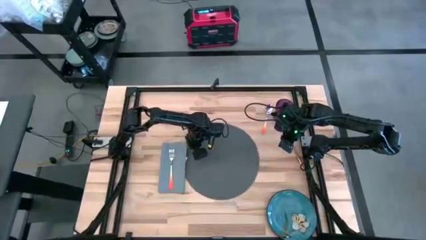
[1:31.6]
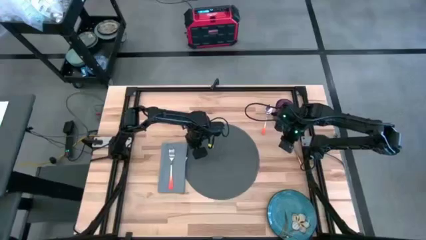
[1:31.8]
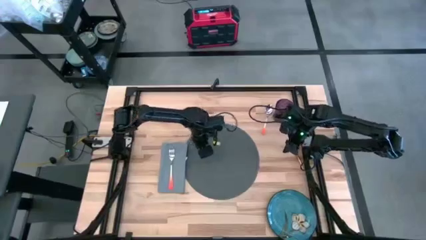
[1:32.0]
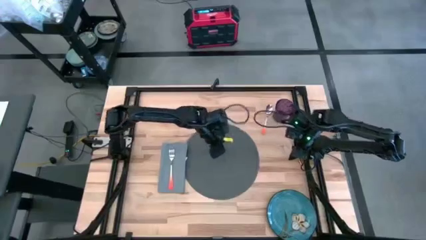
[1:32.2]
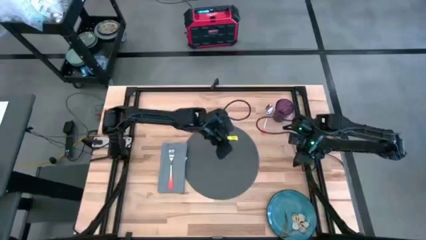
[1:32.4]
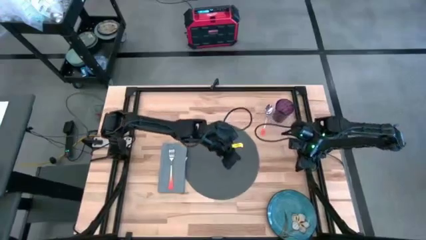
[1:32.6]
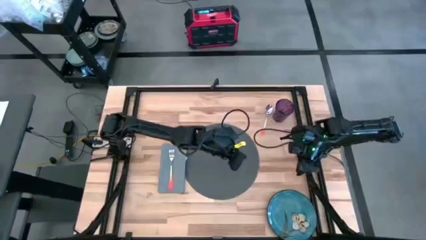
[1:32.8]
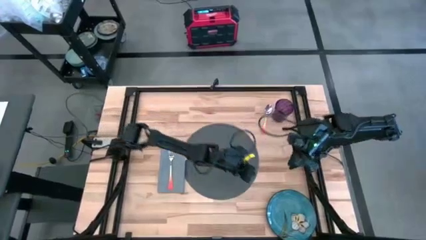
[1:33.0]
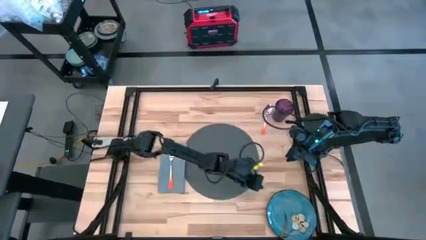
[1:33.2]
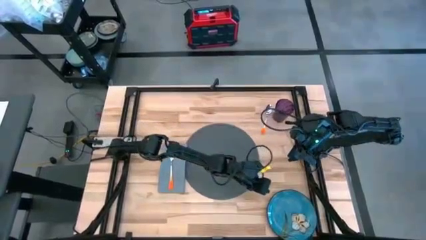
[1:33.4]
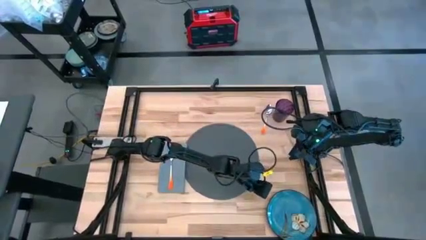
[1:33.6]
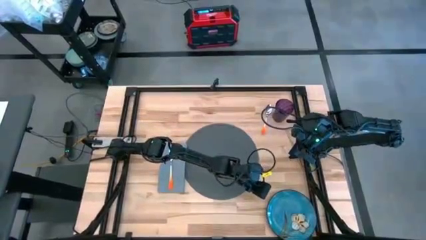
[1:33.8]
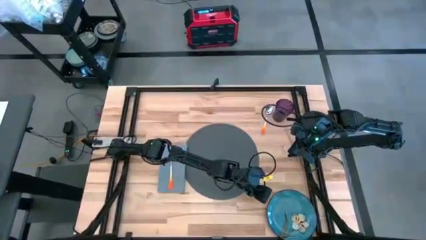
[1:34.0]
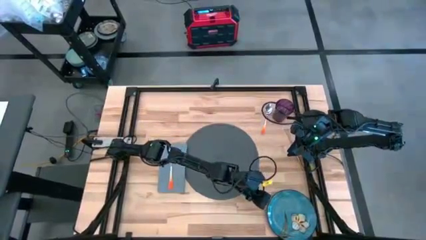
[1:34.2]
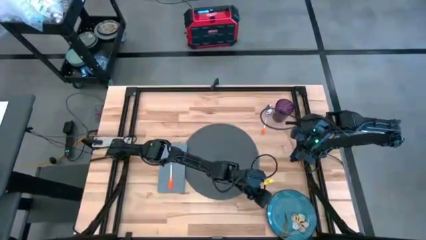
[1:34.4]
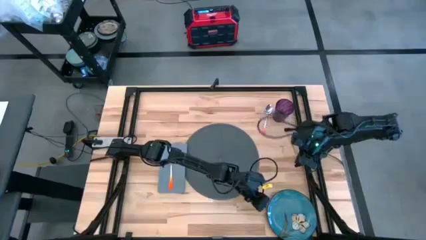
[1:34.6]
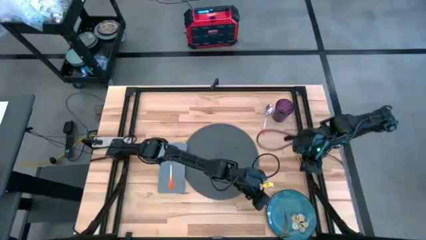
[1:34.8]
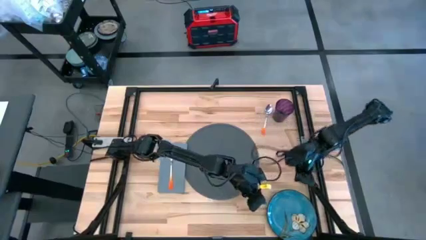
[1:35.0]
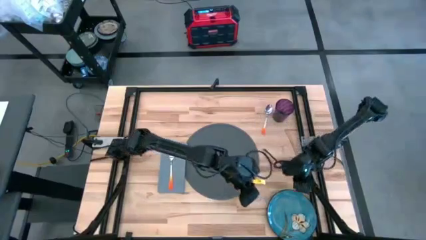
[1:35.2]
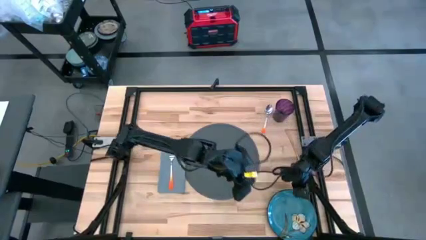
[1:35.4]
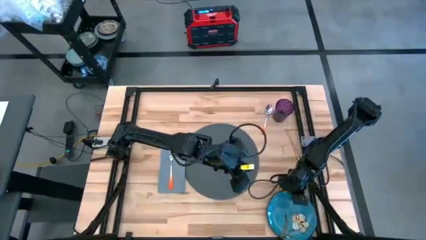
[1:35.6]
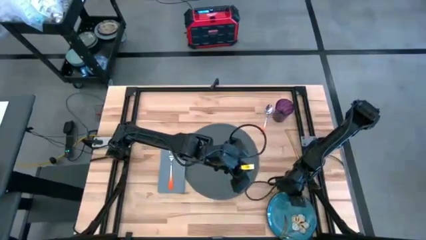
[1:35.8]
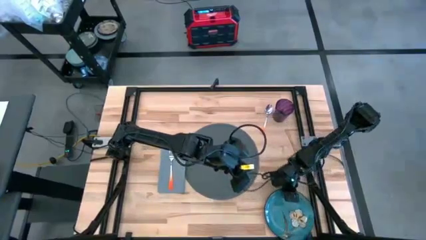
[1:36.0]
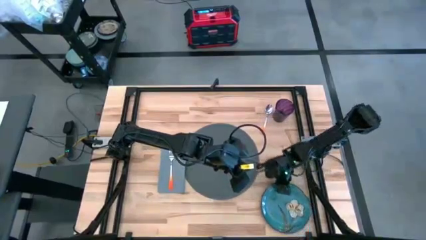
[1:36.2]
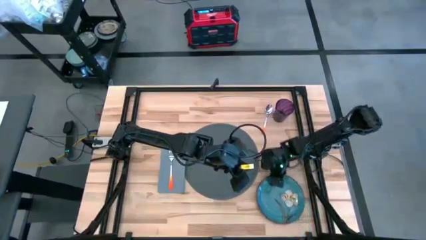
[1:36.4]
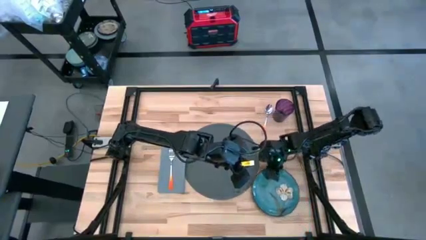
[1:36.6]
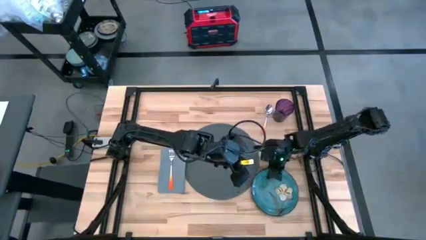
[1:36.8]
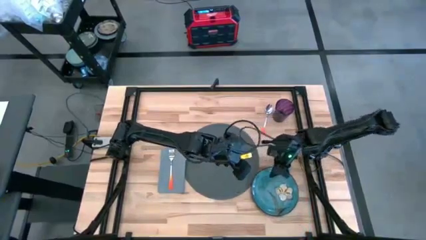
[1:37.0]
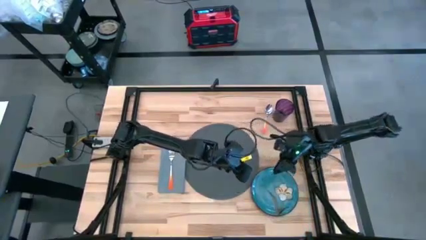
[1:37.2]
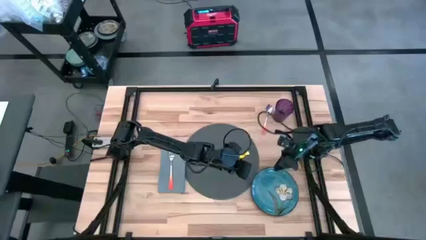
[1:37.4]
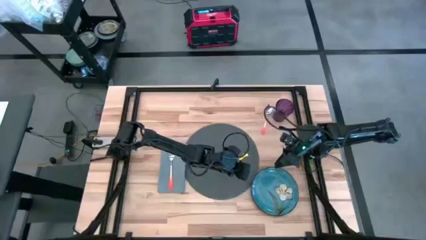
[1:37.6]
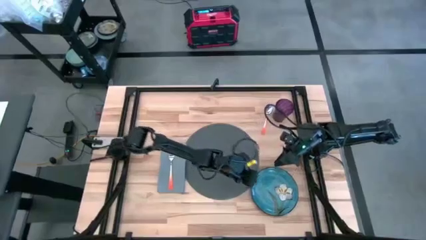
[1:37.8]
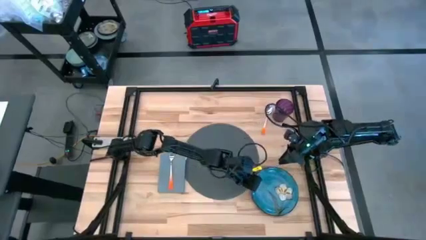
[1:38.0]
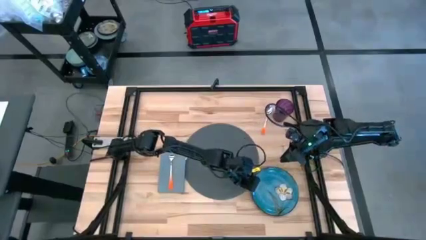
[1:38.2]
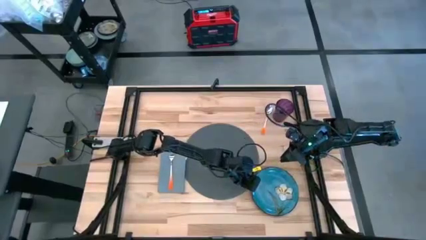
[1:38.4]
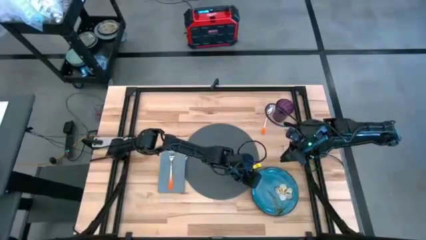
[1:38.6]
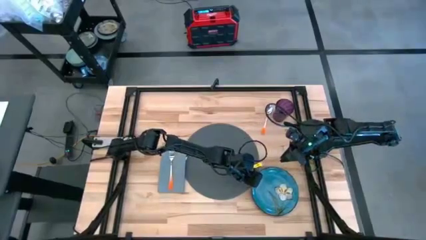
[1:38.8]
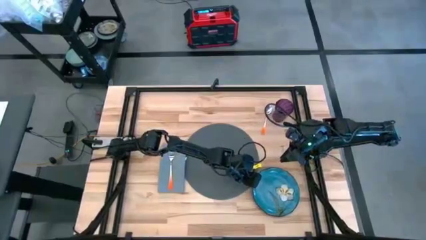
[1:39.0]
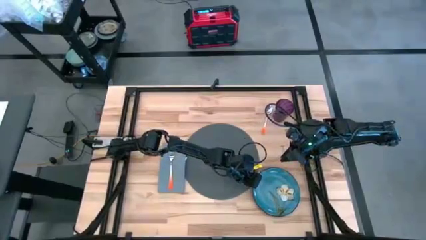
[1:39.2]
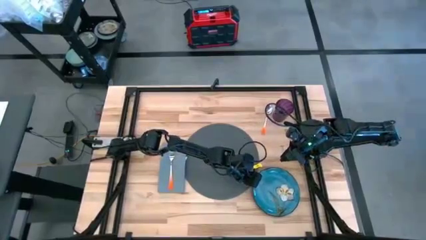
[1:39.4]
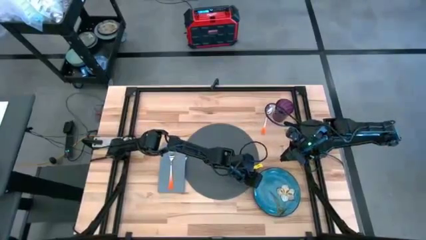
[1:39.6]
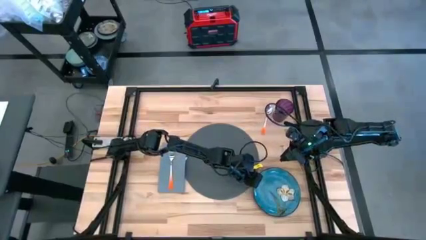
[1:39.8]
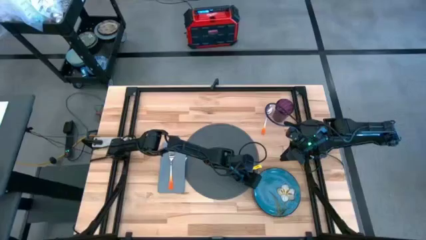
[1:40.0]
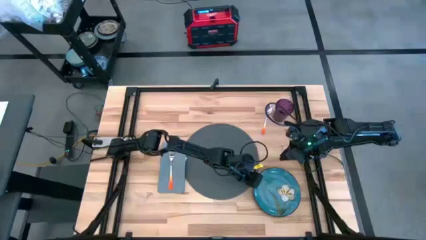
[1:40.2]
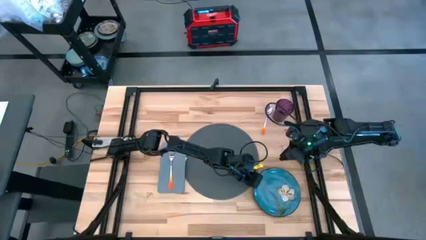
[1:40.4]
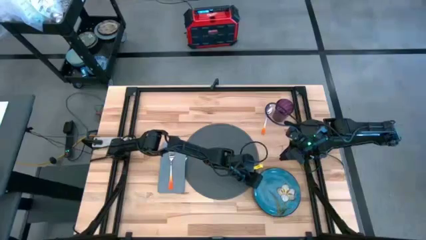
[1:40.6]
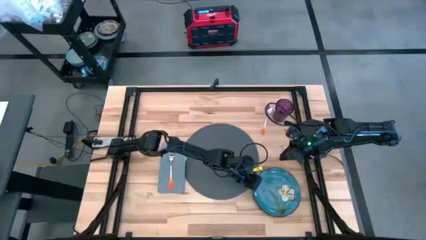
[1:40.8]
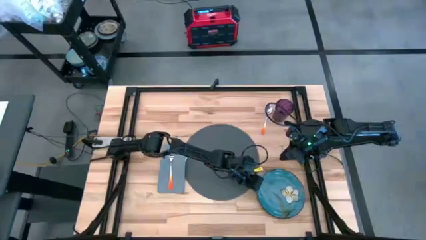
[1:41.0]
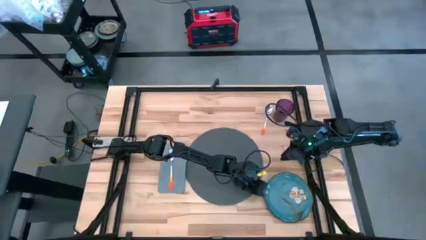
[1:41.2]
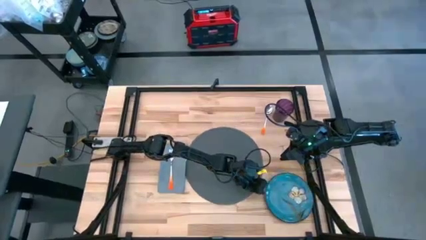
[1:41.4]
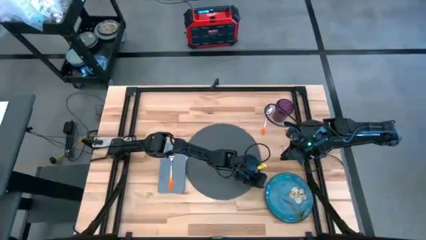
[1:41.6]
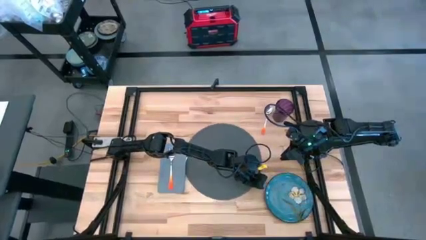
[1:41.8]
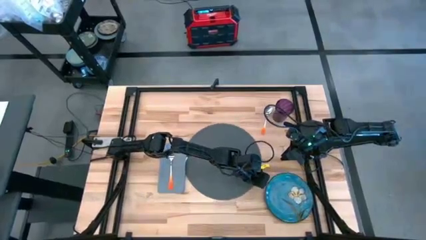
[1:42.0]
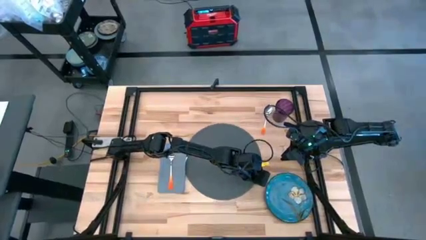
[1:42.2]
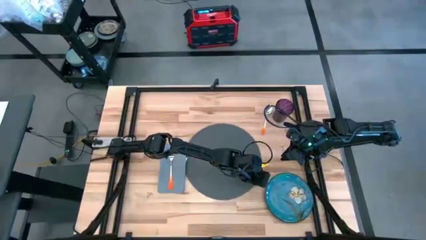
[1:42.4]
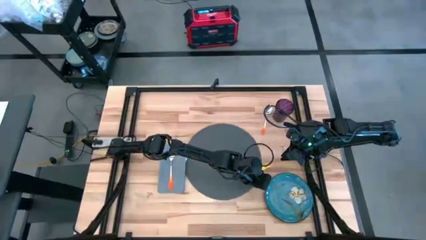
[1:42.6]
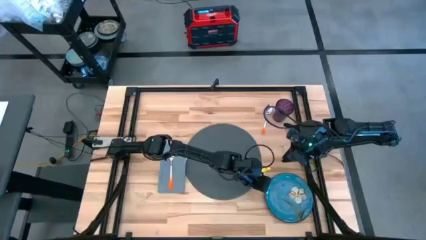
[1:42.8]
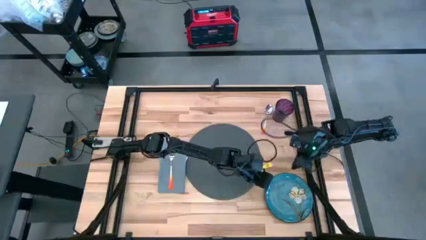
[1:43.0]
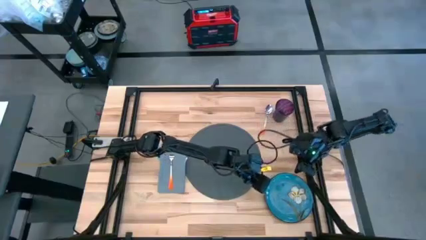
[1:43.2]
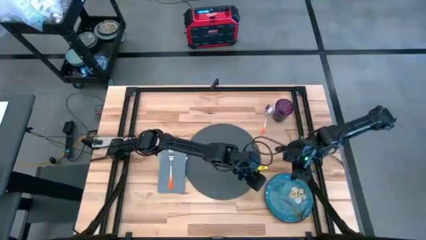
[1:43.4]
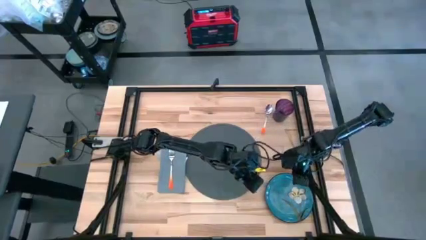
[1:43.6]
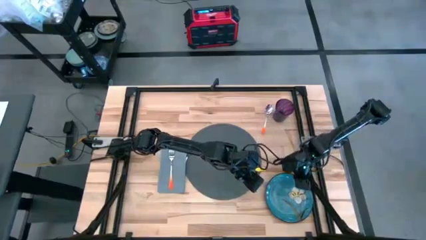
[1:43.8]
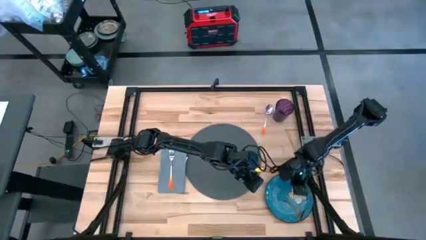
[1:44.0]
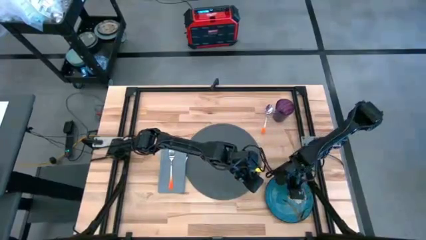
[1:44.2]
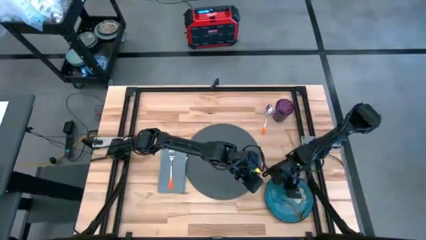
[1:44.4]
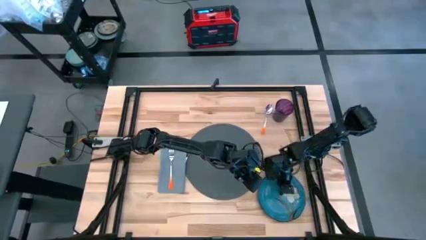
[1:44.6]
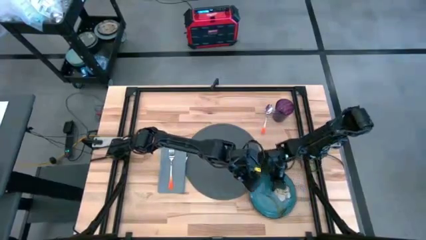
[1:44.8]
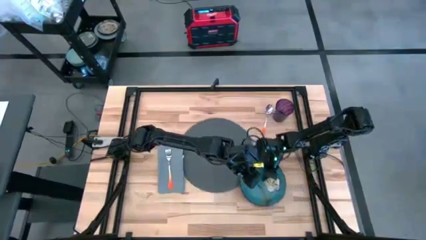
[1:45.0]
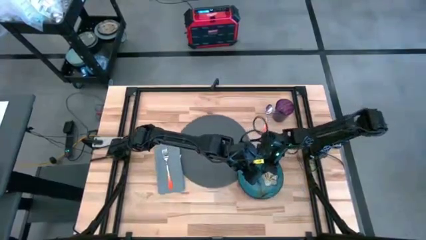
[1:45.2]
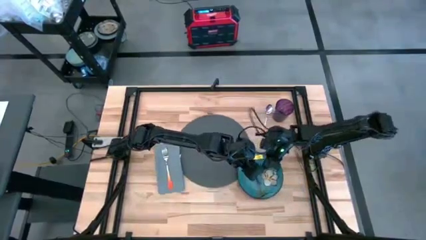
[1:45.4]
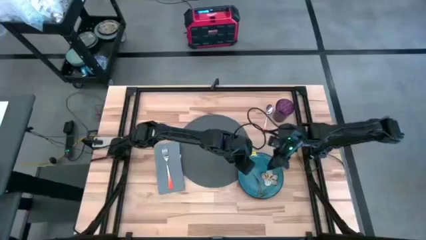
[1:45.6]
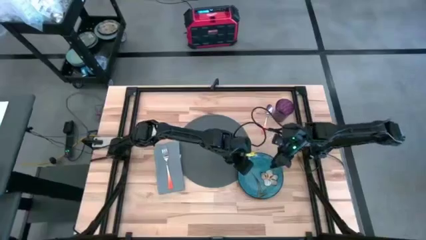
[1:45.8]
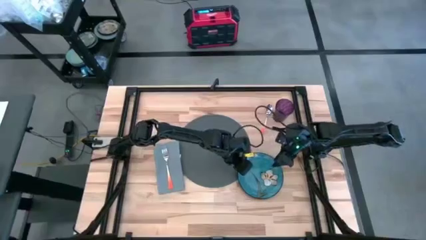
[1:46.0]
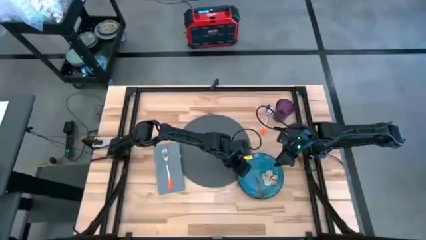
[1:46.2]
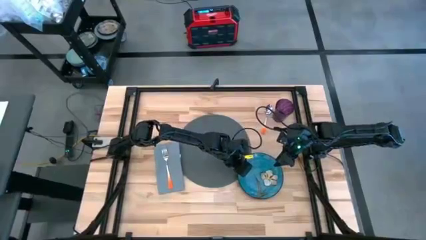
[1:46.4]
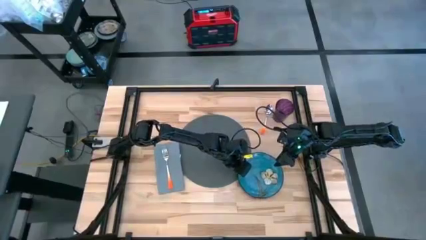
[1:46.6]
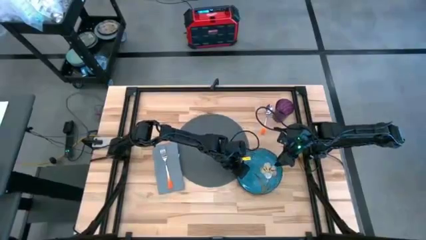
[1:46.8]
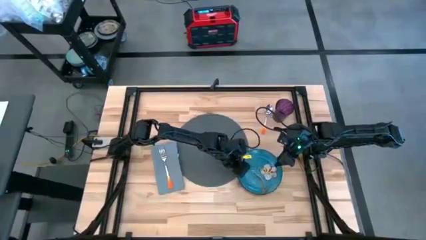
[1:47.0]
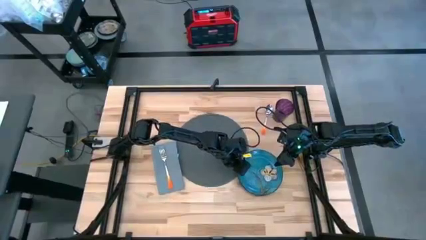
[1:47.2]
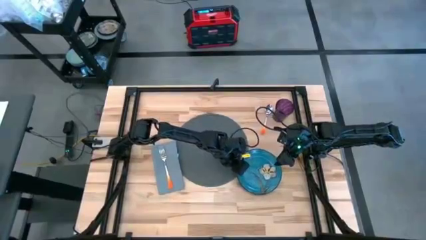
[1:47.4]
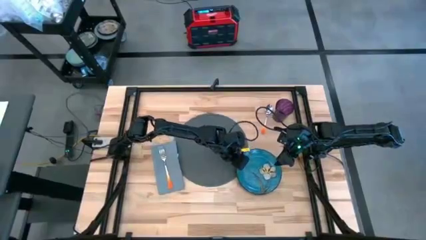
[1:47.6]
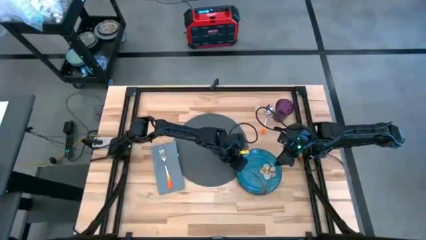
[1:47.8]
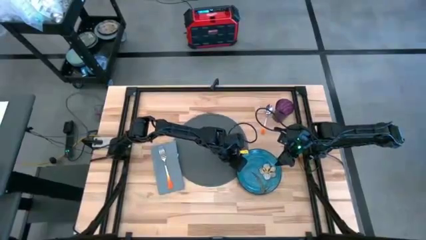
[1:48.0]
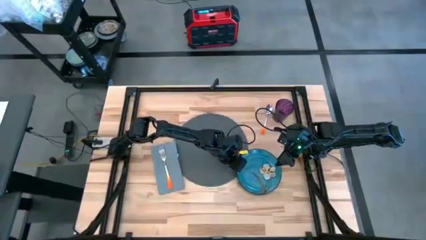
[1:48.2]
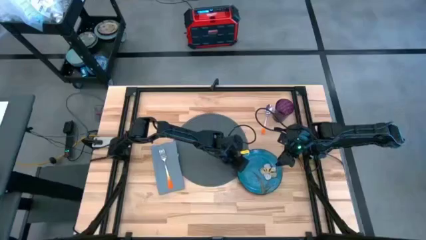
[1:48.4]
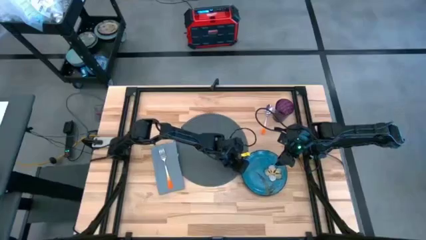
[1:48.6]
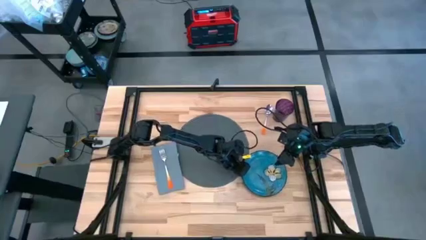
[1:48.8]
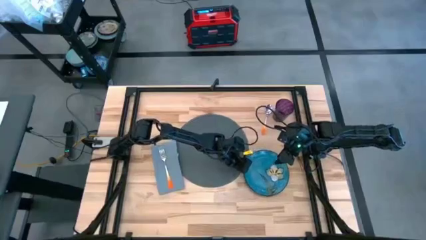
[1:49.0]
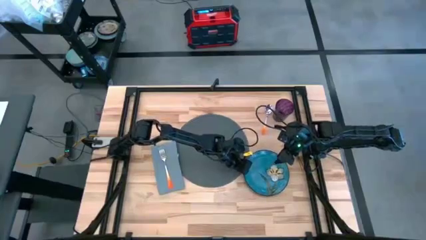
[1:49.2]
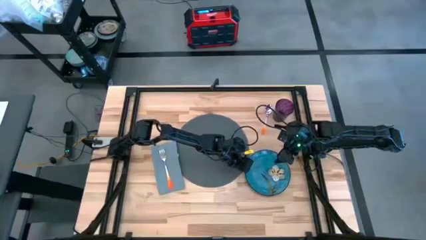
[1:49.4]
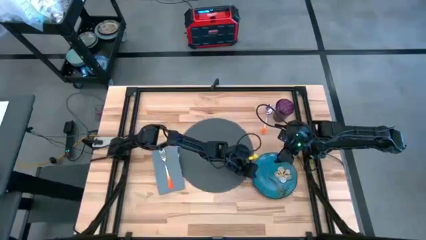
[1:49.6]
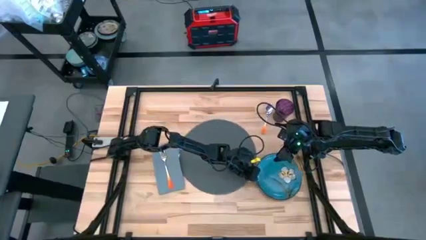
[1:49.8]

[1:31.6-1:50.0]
Task: Set table place
Put the blue plate on top of the gray placemat
